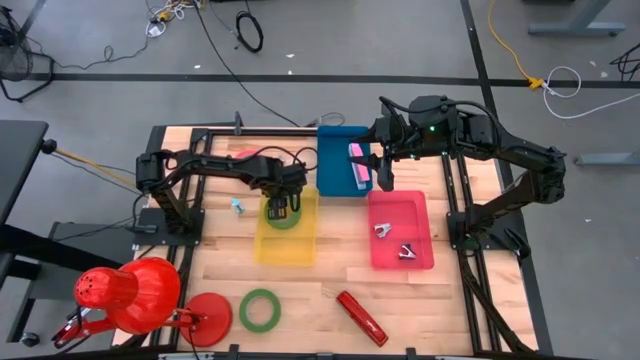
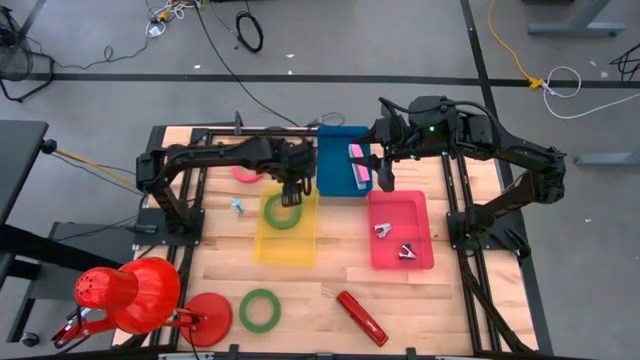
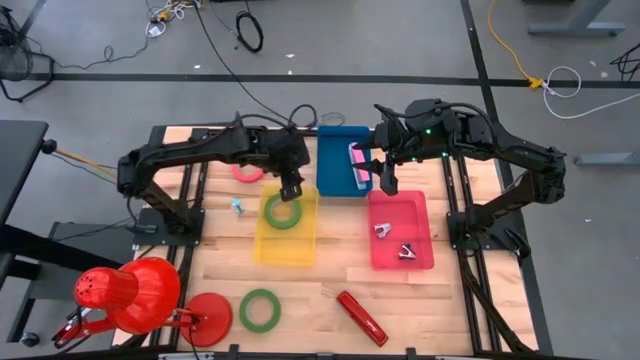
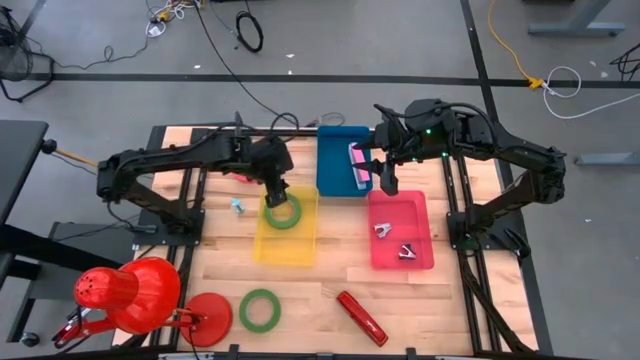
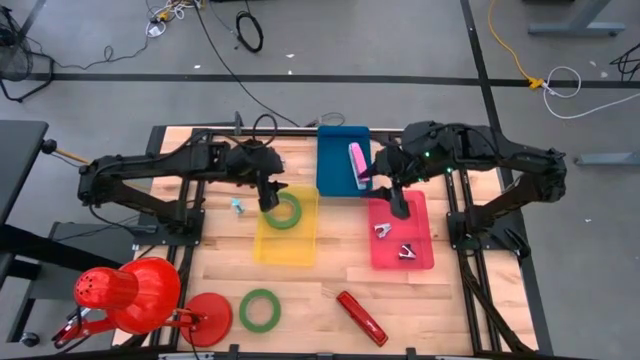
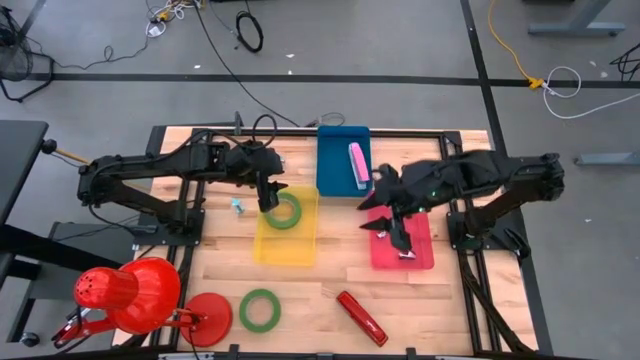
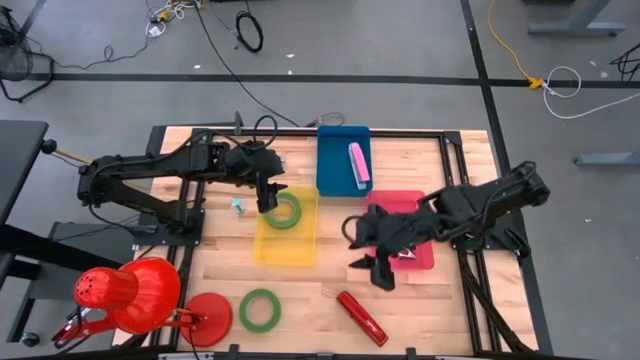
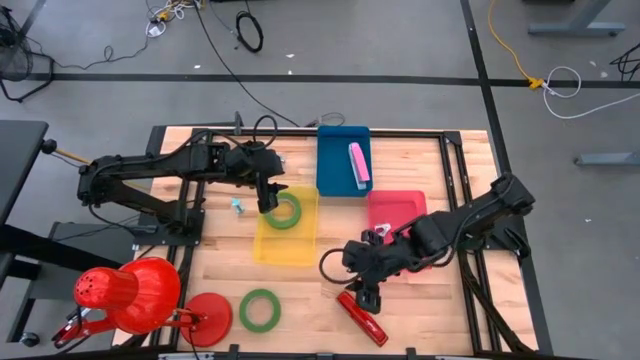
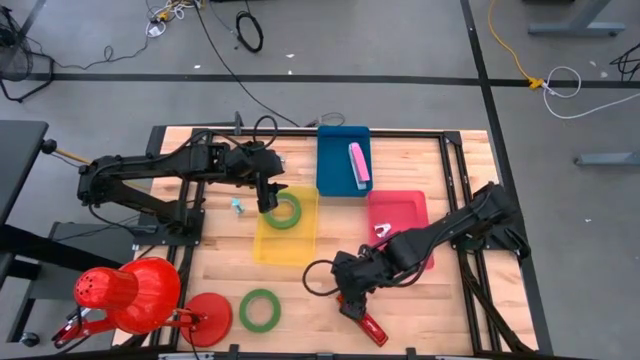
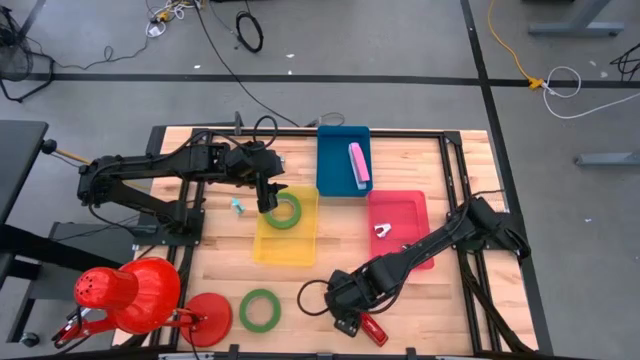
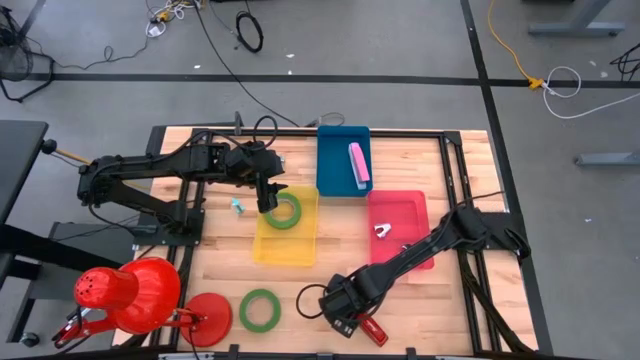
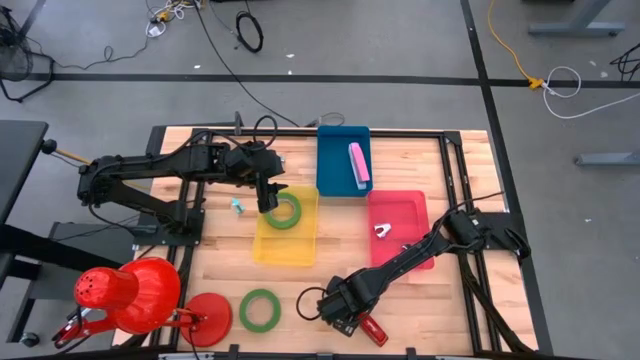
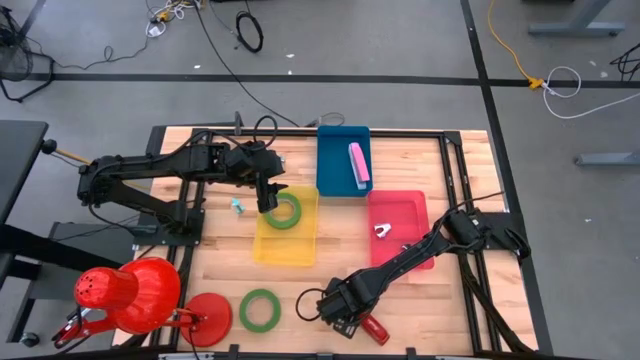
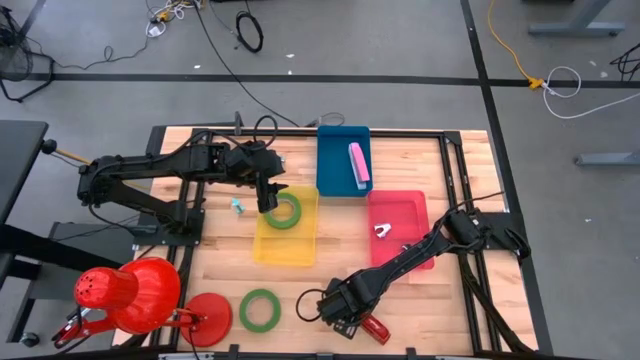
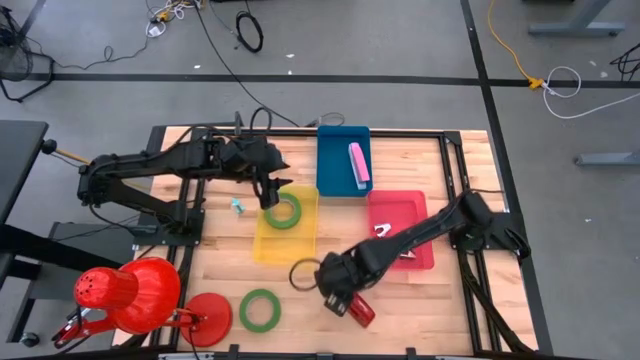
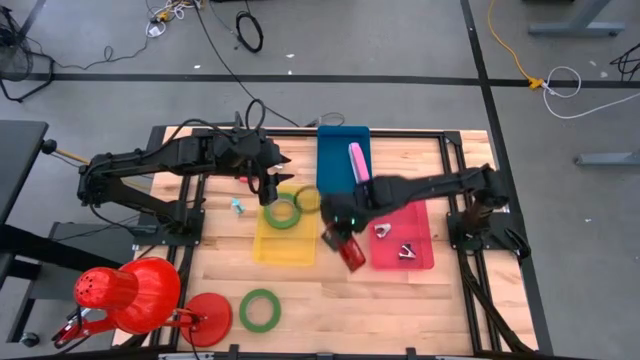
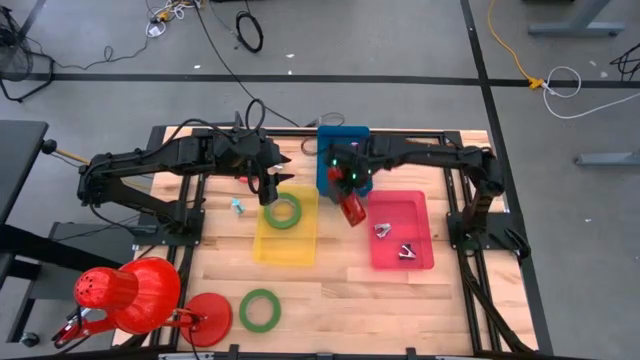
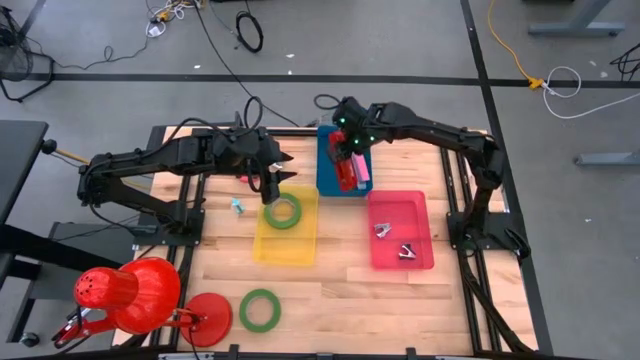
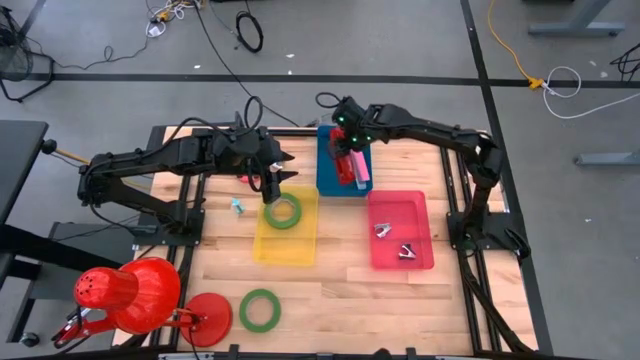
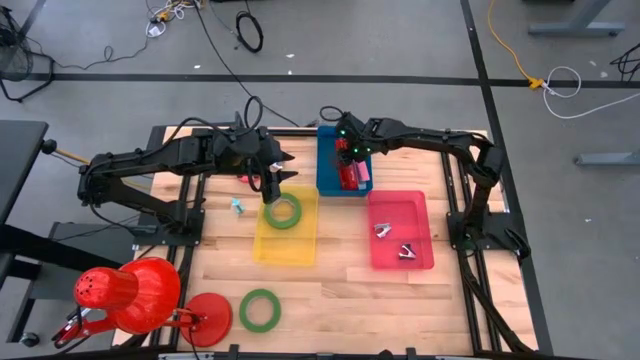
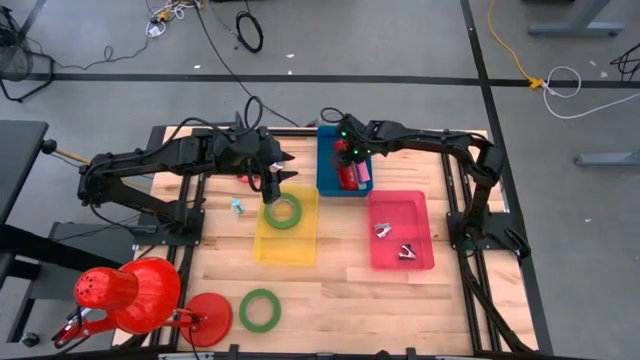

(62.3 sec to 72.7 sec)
Task: Pick and place Stapler, Stapler remover, tape
Put the red stapler into the blue bin

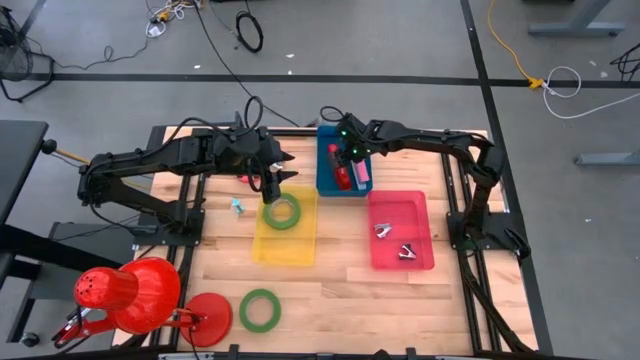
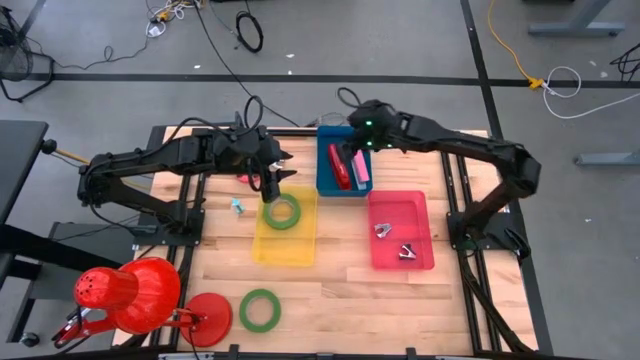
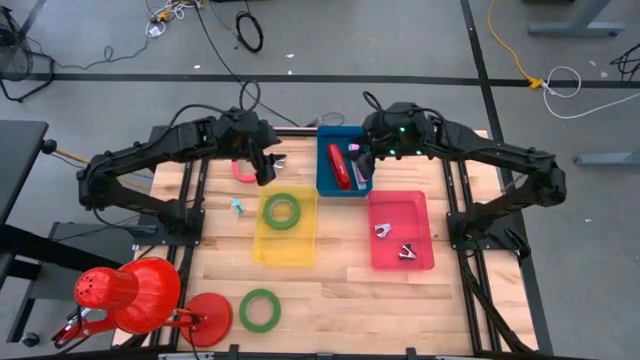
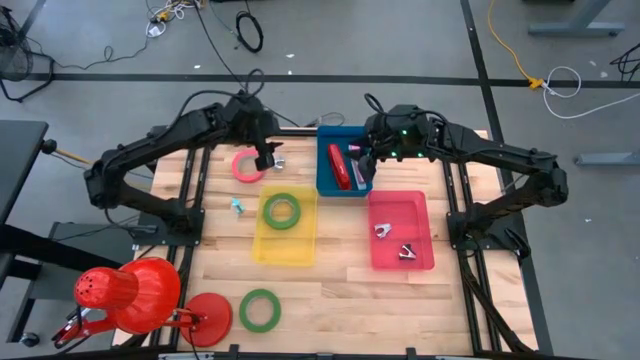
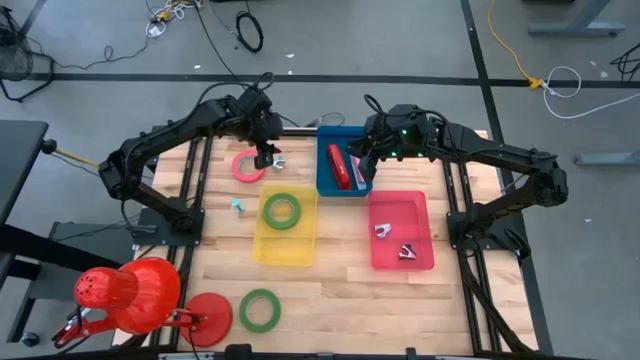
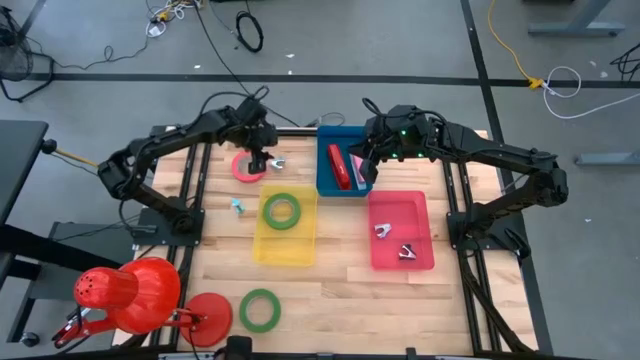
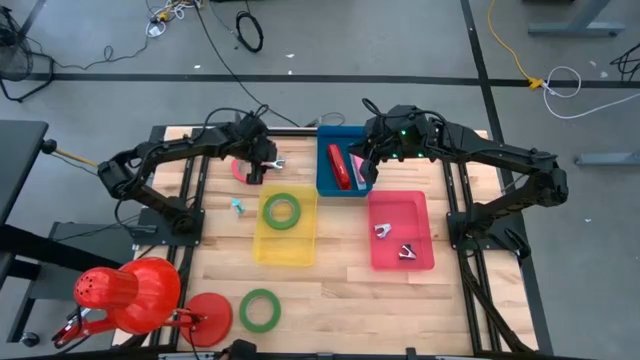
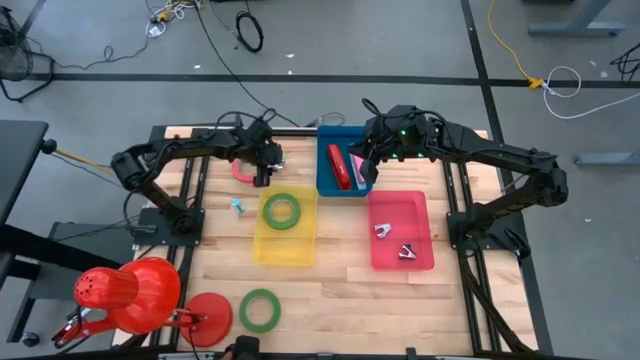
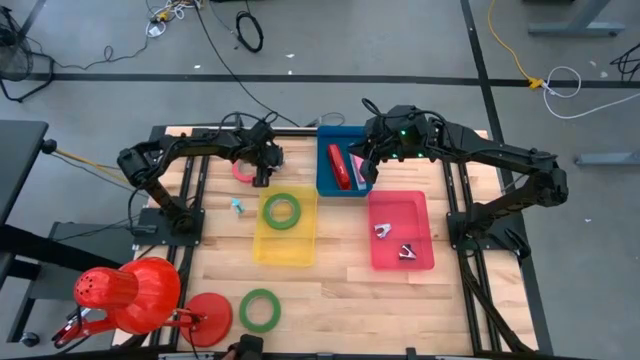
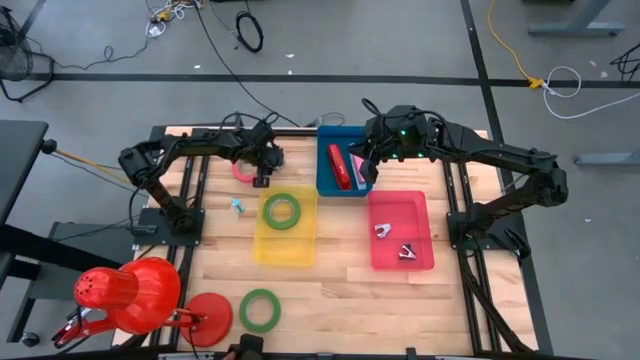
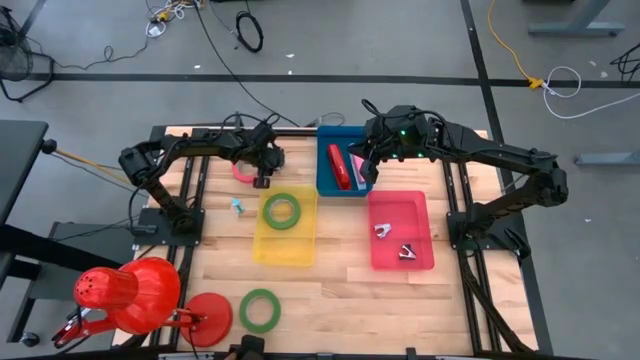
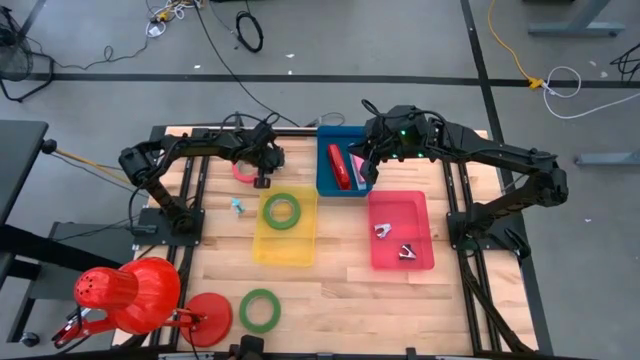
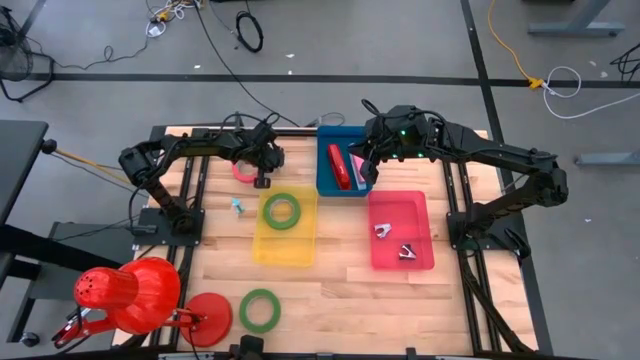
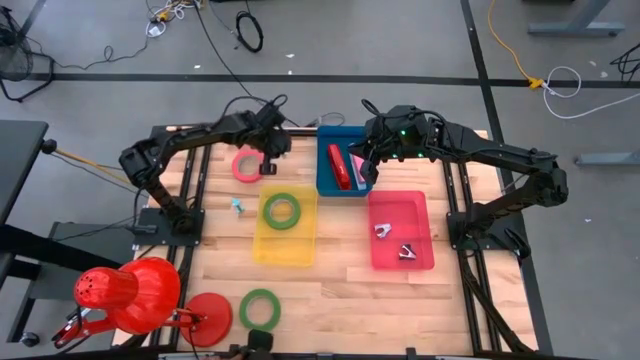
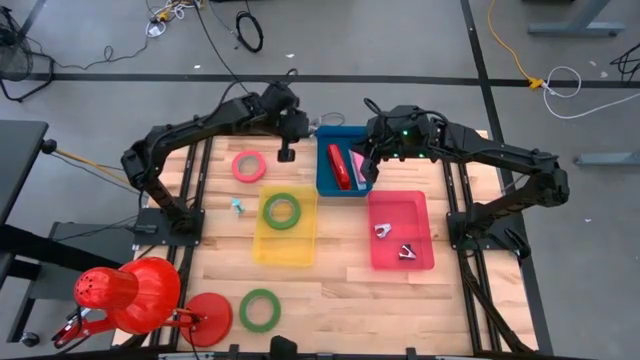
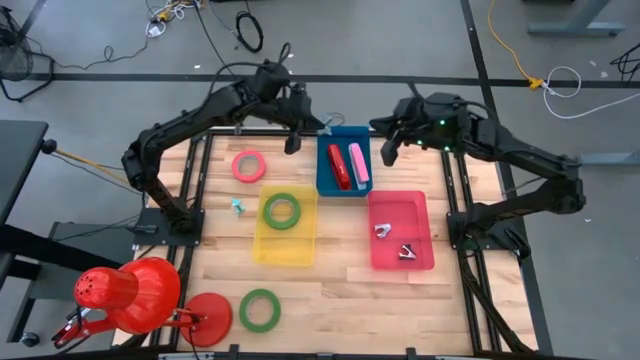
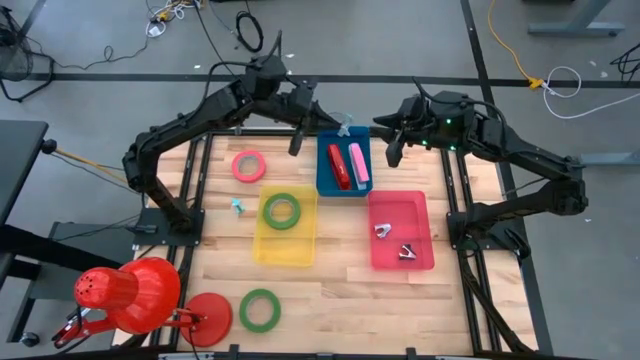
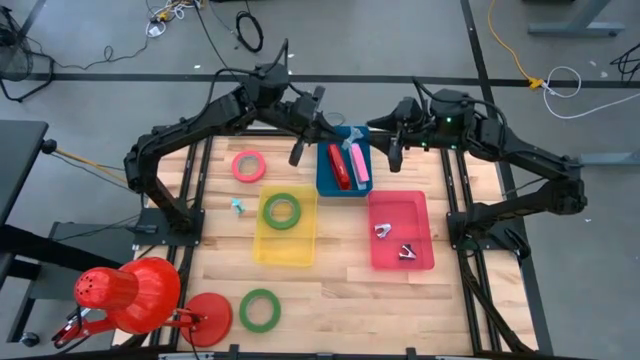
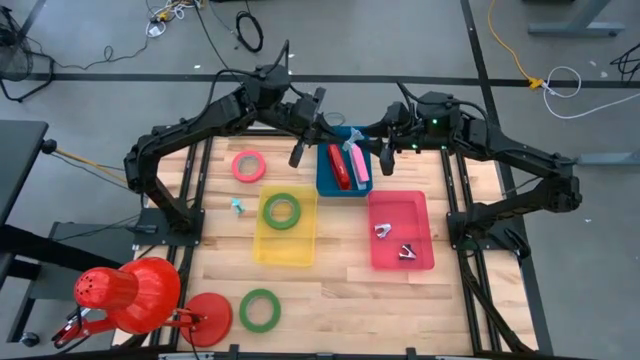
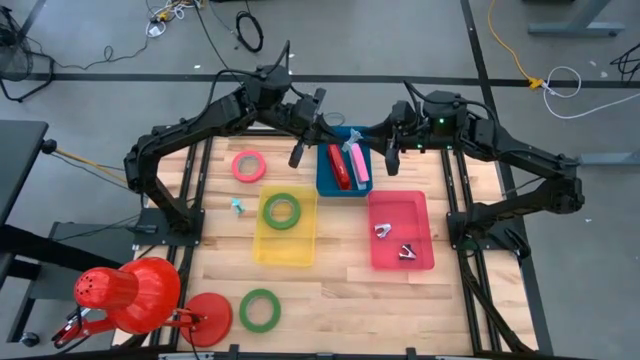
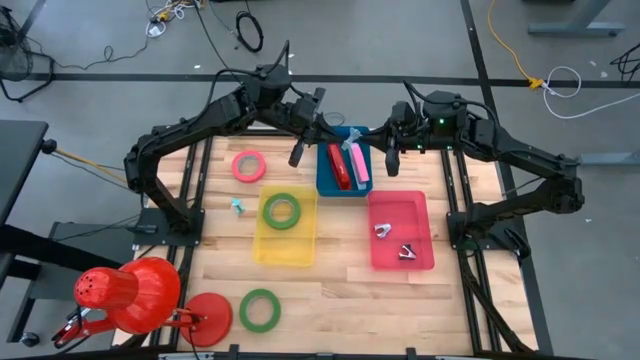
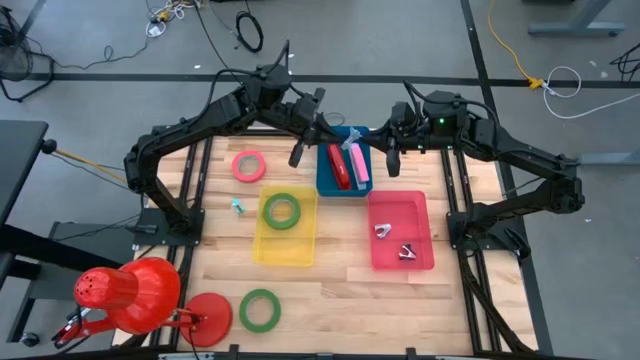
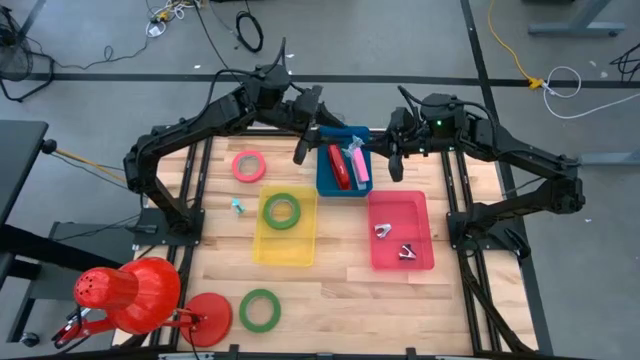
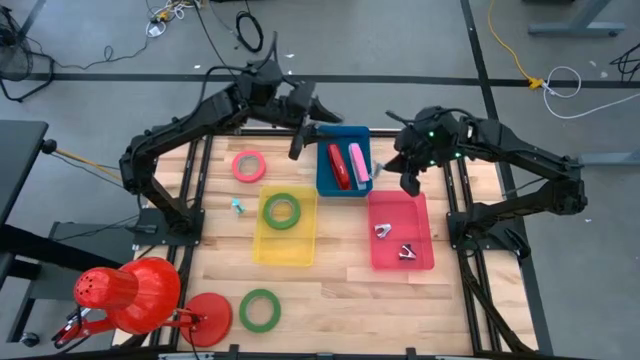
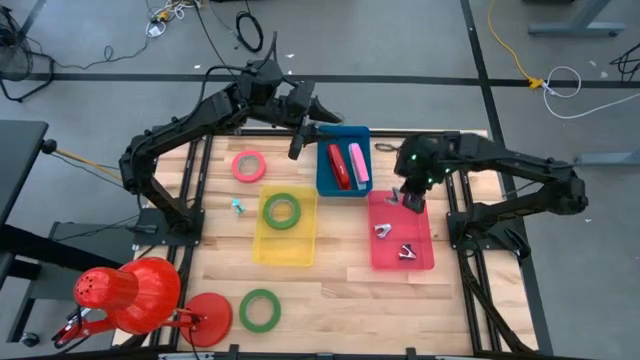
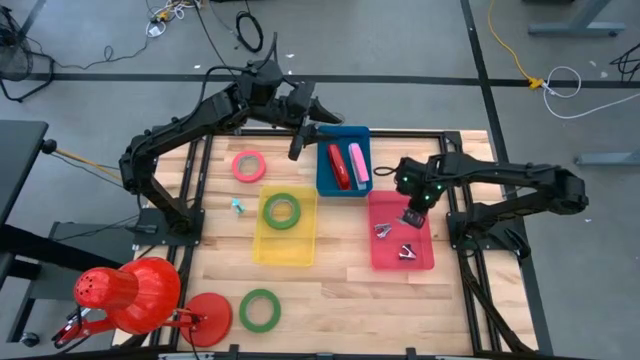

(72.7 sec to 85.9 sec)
Put the top light blue staple remover into the red bin
